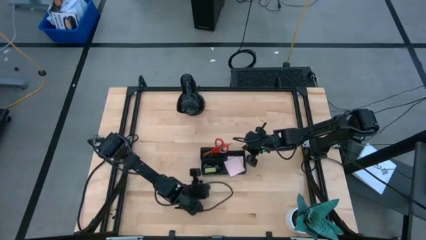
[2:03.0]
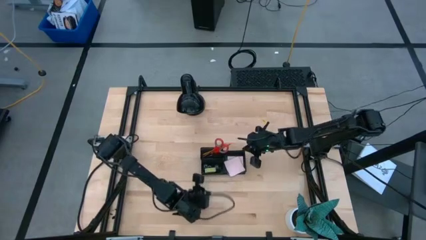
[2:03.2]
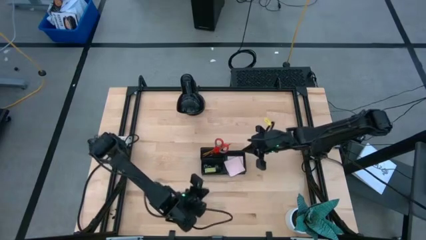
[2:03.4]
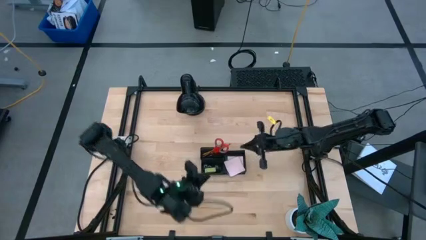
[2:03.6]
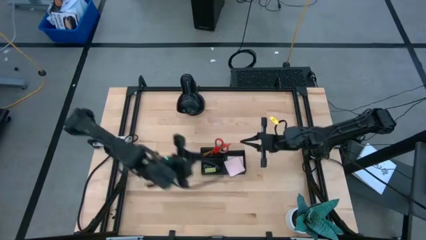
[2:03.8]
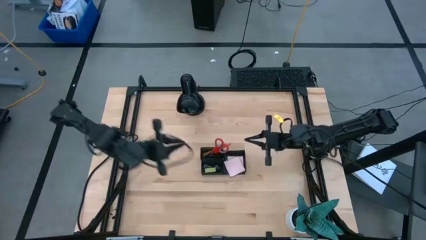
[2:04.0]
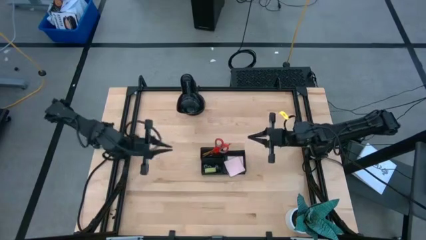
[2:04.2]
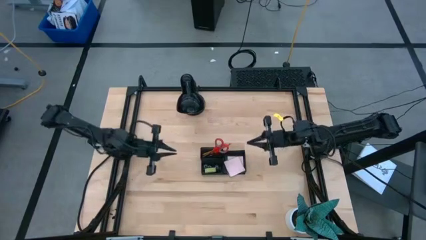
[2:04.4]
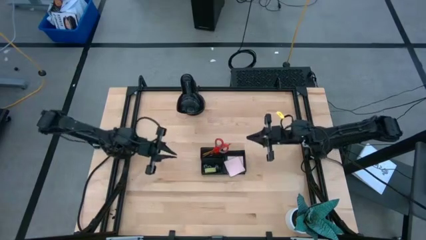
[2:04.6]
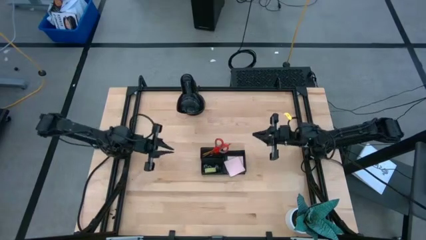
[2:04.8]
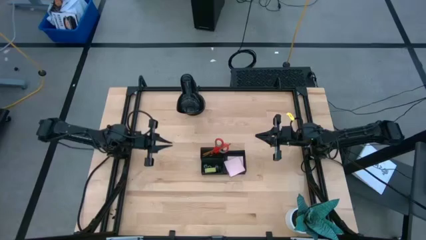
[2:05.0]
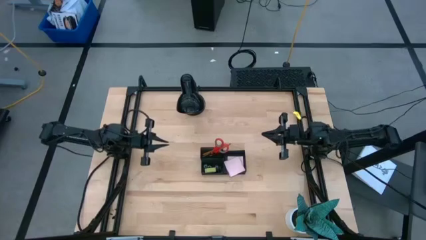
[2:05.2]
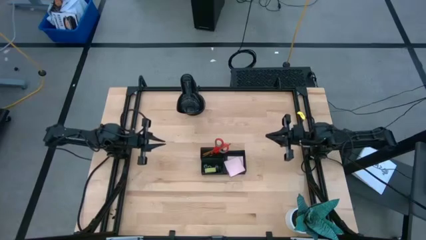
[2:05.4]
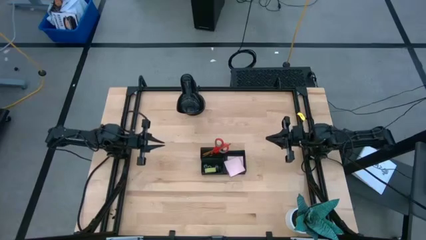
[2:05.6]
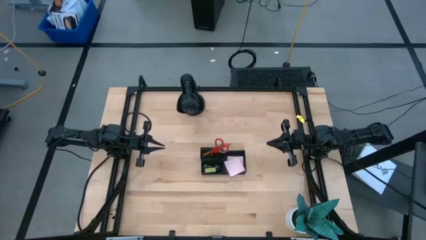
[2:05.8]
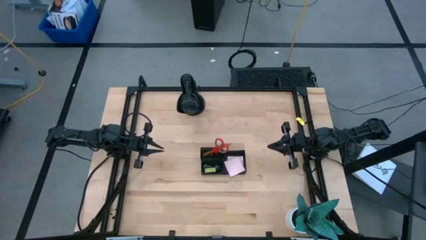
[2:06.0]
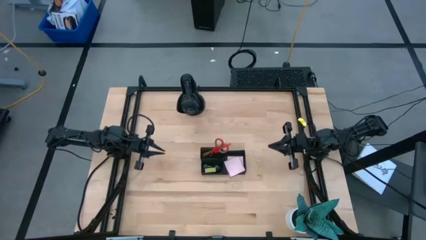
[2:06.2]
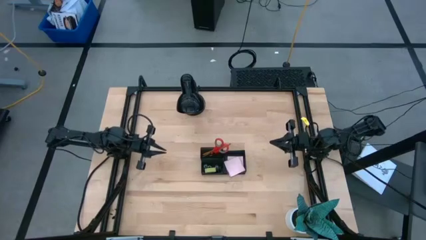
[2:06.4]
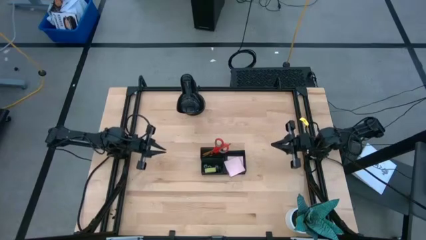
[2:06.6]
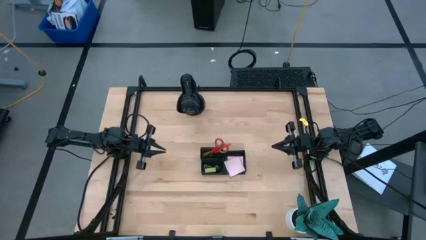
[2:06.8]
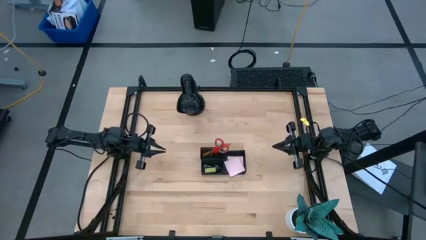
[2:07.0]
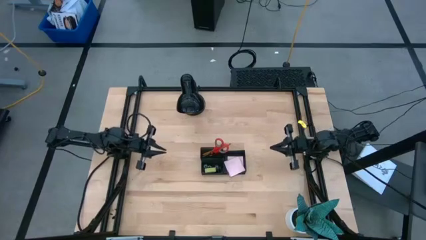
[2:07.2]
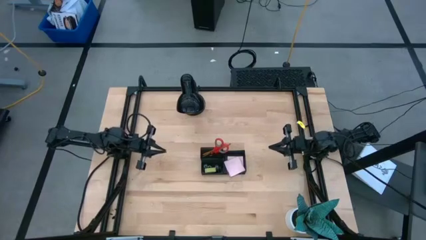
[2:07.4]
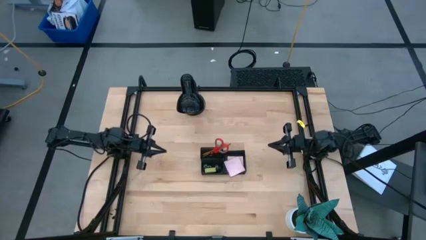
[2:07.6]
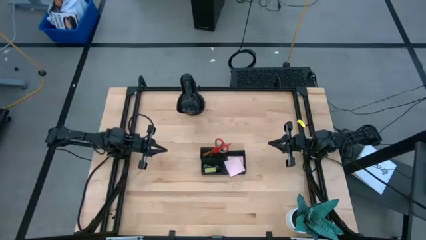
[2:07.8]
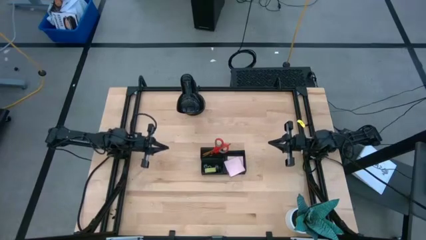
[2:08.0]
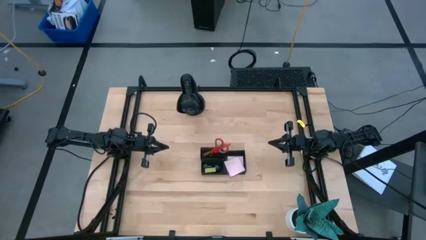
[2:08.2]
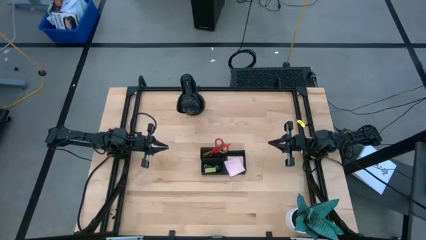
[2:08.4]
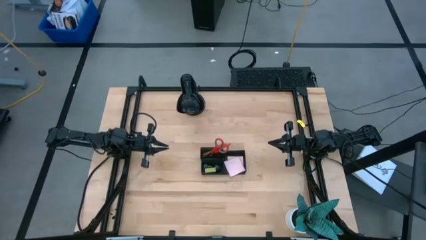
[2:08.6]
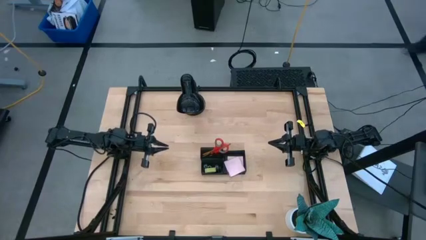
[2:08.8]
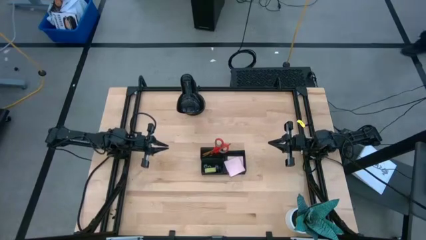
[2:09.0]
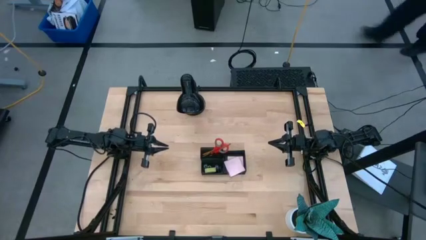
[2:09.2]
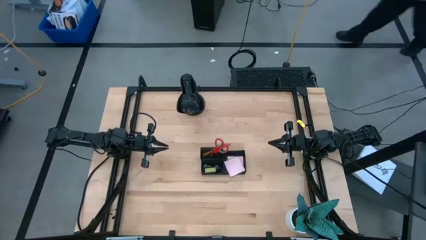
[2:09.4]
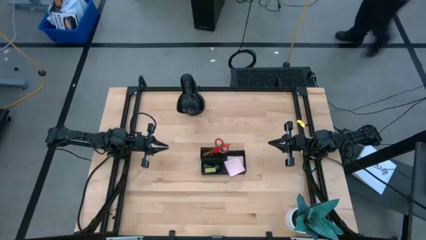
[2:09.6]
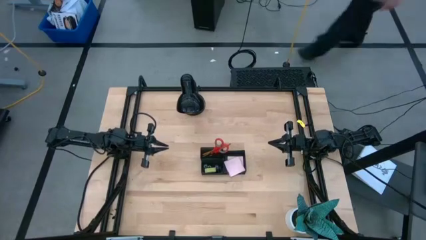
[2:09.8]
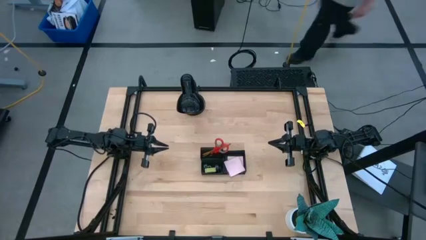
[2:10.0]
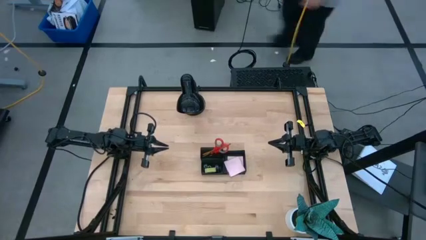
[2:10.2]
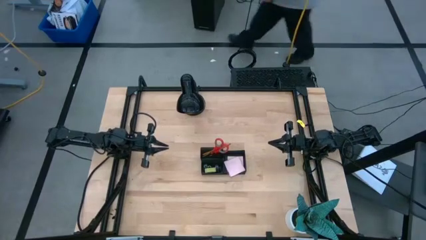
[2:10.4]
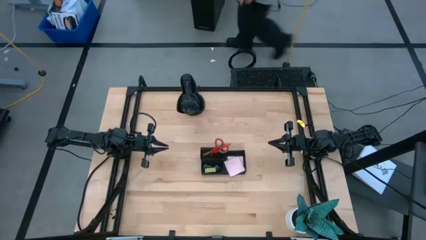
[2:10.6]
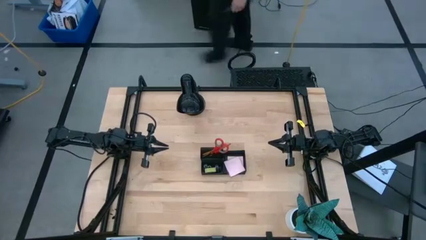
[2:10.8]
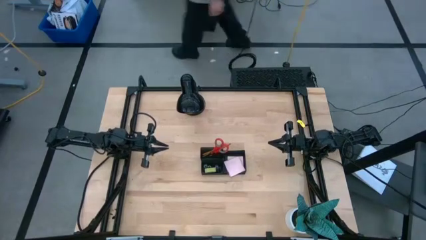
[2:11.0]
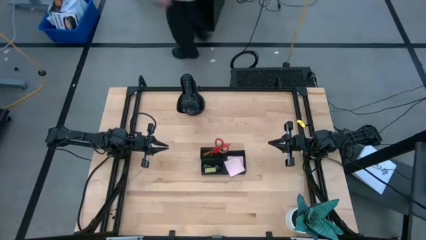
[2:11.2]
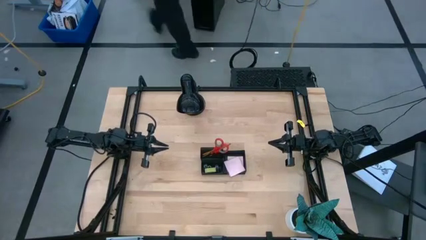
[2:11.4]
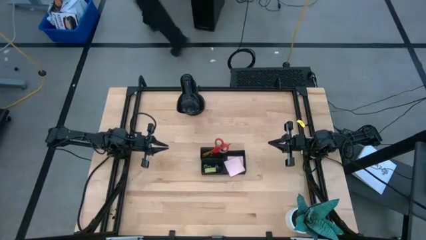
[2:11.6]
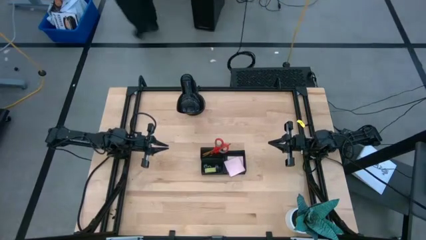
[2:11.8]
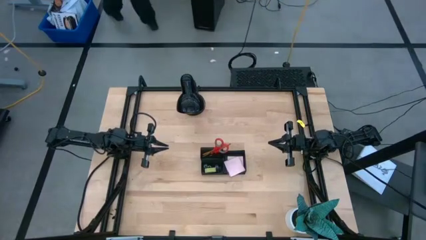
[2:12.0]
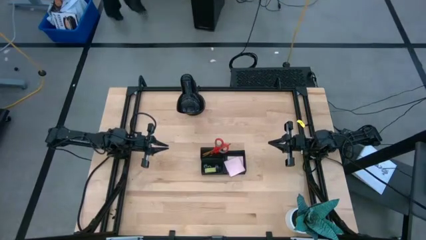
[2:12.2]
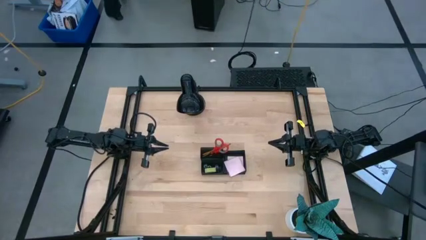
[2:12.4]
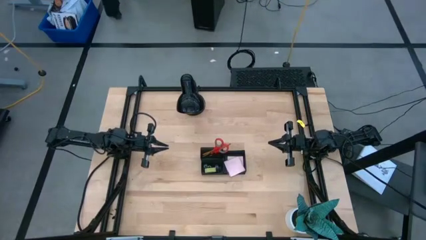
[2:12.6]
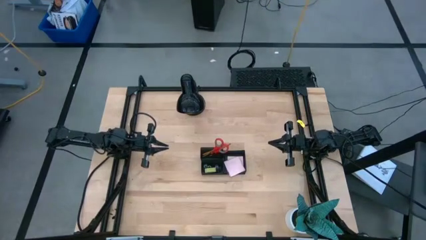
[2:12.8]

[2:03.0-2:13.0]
Task: Pick and place office supplies into organizer
Return to Home Position

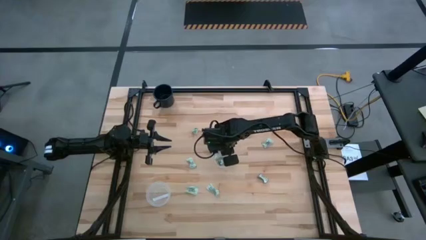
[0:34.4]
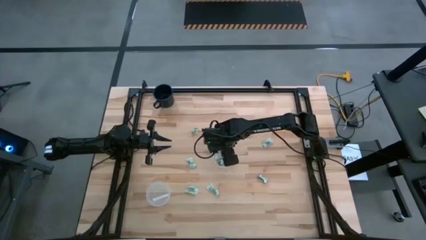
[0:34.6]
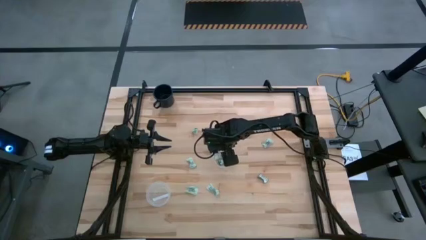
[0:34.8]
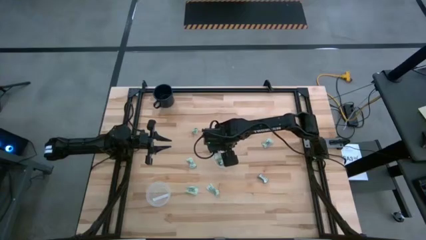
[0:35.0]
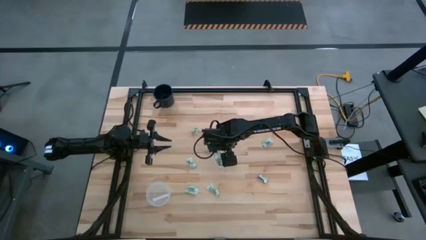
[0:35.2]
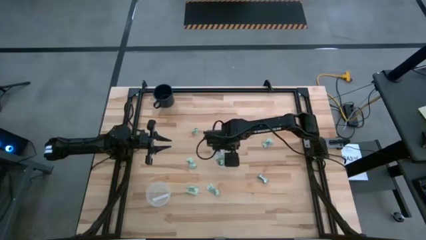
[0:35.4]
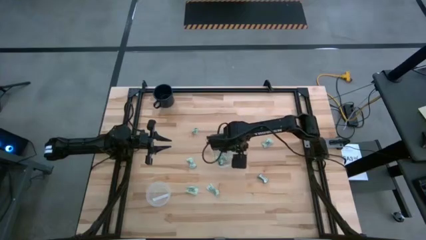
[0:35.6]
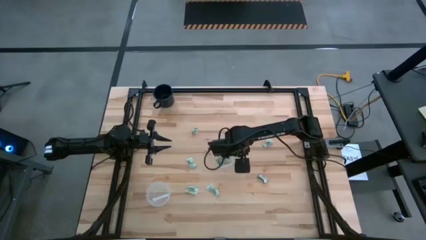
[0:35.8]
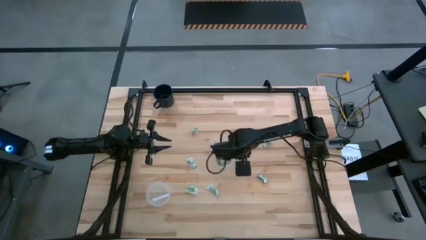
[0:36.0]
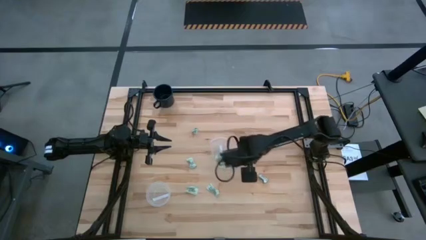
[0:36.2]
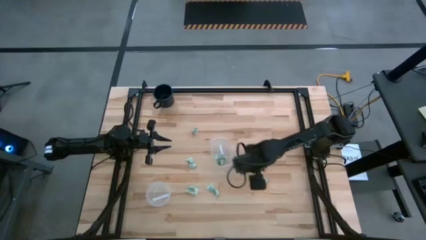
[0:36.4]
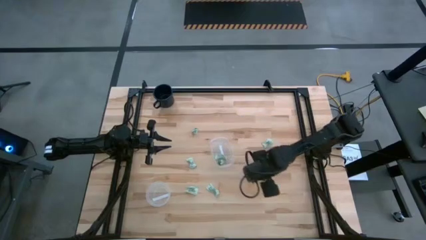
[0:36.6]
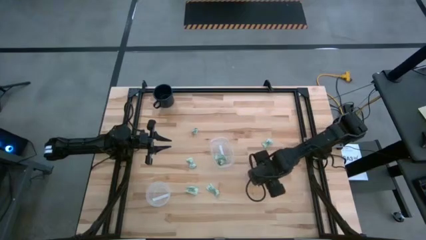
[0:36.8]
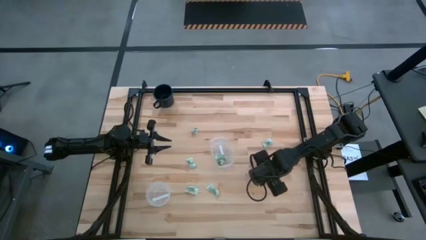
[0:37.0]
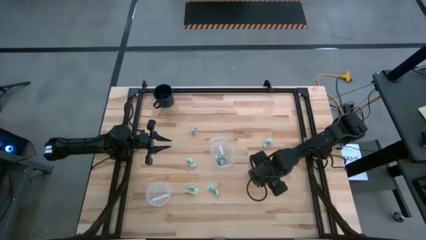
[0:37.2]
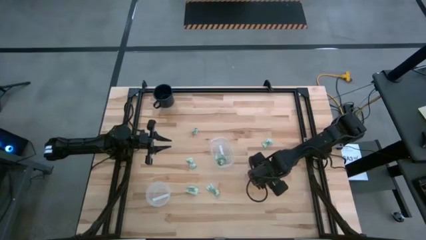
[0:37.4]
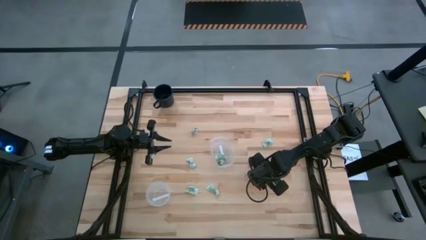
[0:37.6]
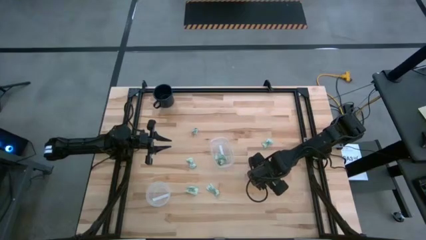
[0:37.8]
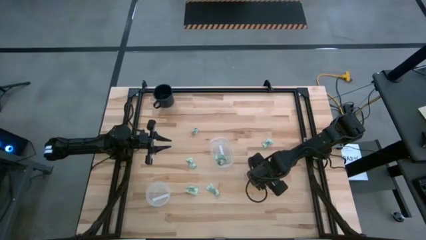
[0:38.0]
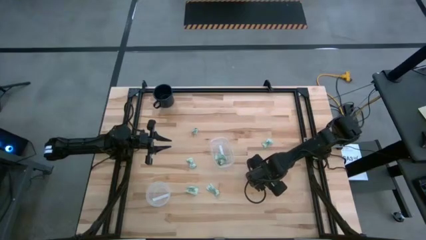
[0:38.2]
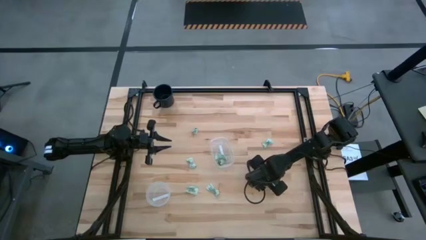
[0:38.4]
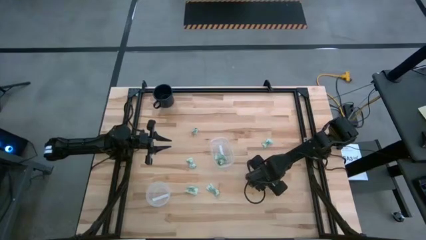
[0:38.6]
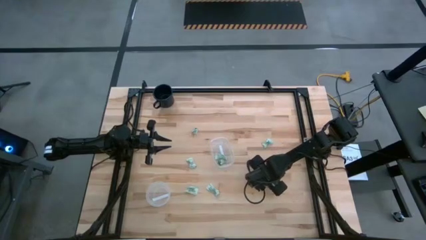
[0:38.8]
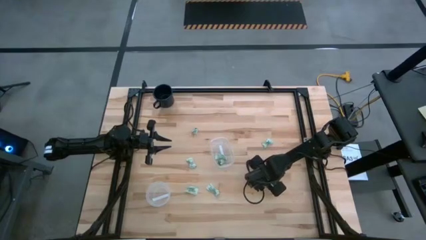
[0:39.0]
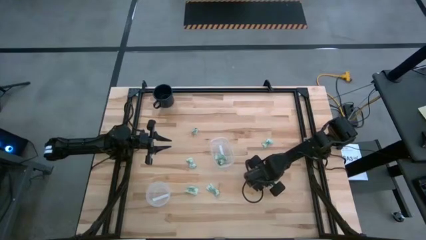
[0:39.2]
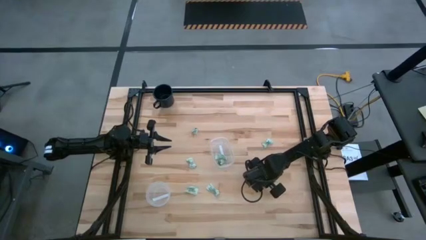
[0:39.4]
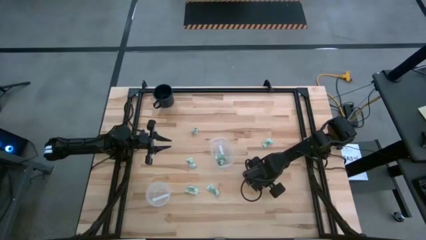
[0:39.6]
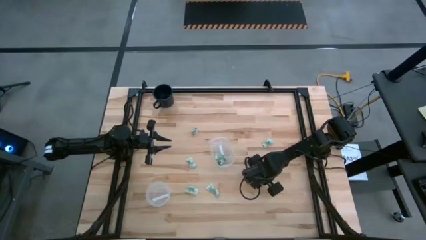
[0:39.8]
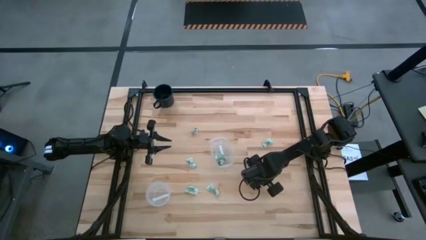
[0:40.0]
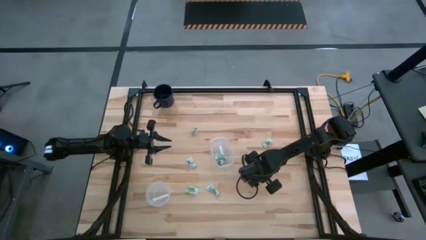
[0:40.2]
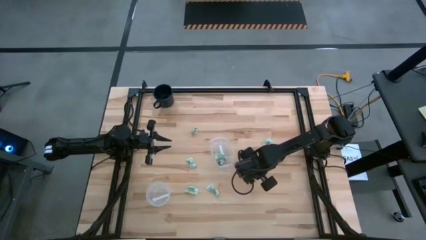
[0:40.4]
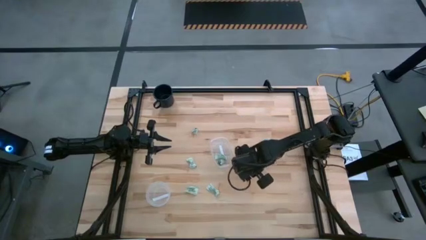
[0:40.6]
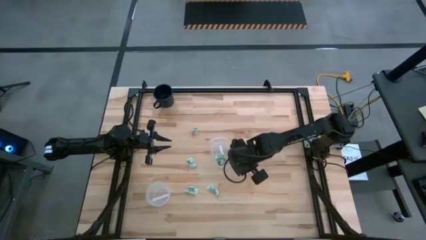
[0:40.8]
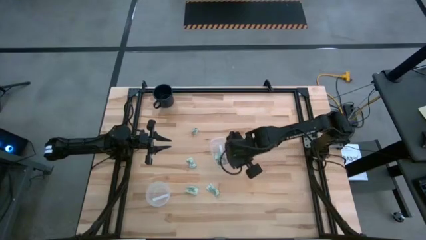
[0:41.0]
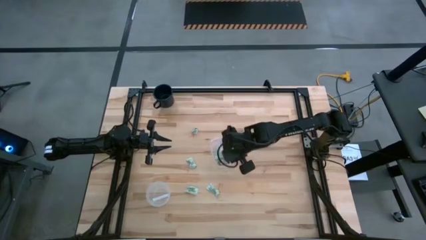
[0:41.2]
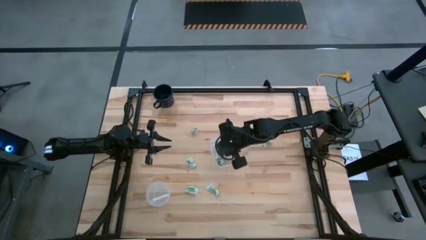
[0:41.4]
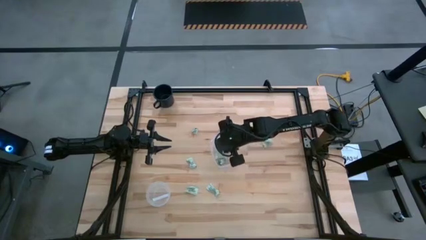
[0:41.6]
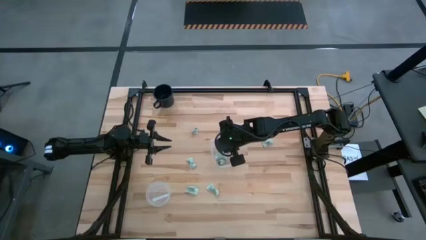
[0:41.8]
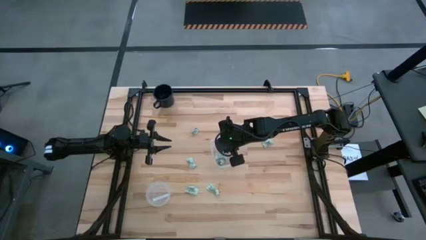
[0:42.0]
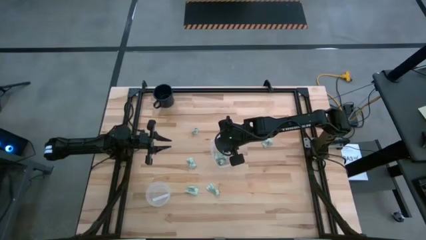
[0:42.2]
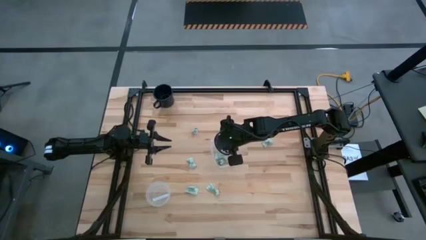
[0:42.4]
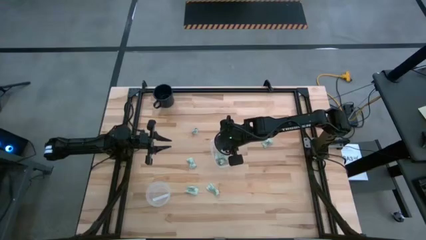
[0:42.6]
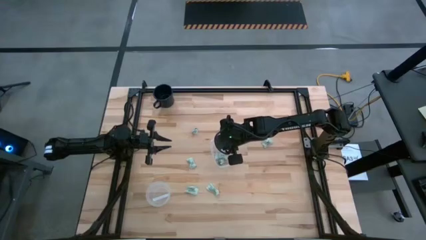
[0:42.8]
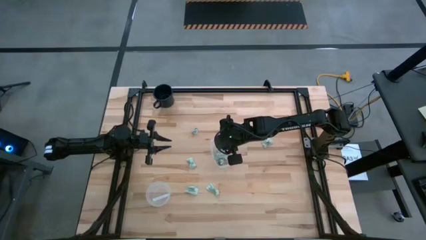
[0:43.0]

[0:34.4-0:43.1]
Task: Pick and place items into bin
Put the stevia packet into the transparent bin
